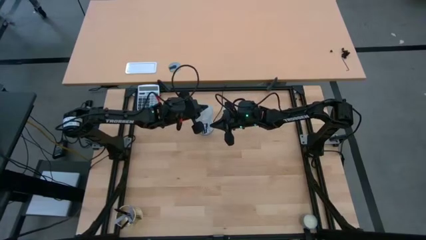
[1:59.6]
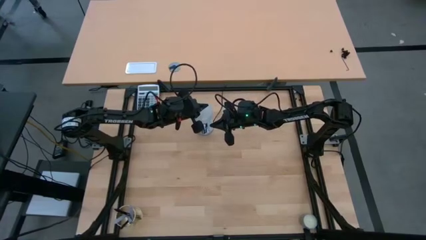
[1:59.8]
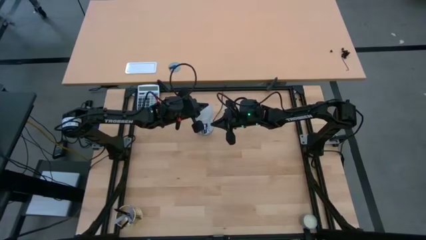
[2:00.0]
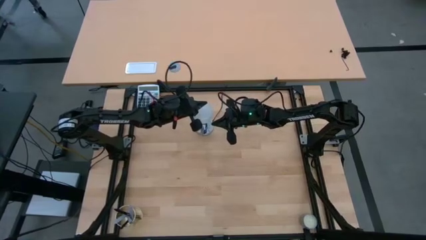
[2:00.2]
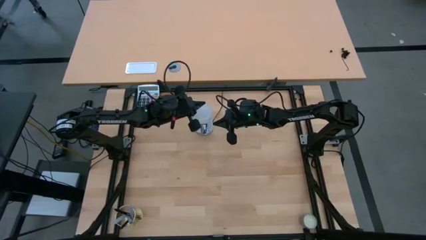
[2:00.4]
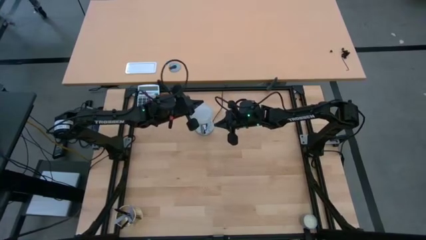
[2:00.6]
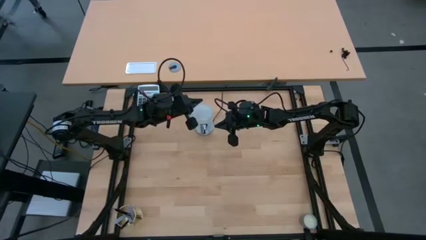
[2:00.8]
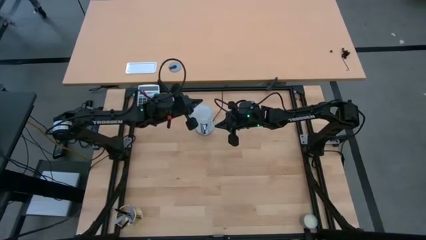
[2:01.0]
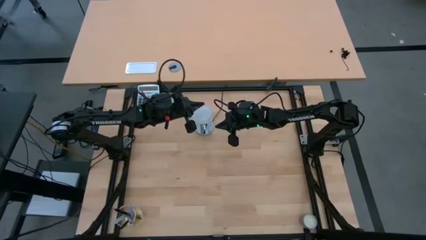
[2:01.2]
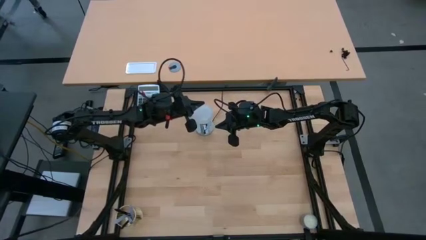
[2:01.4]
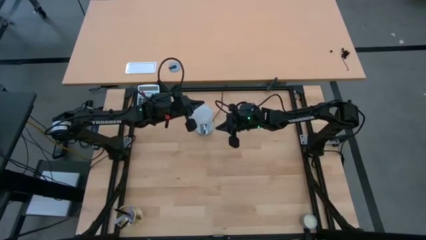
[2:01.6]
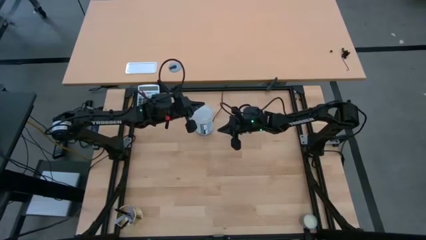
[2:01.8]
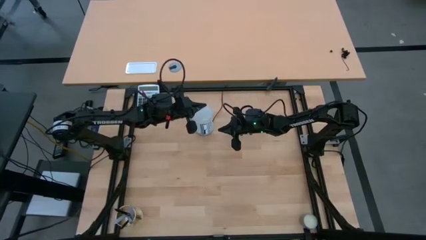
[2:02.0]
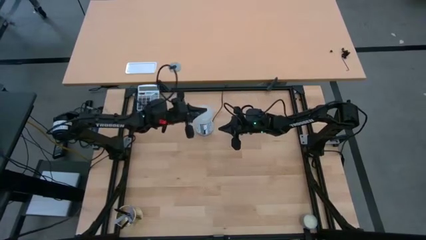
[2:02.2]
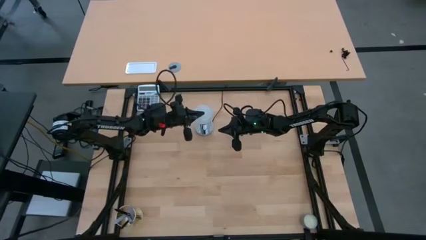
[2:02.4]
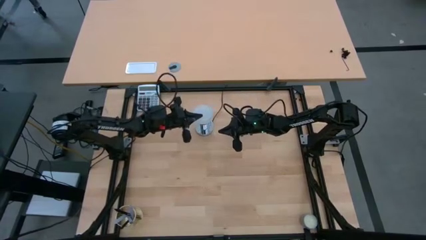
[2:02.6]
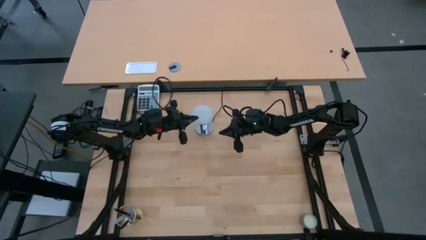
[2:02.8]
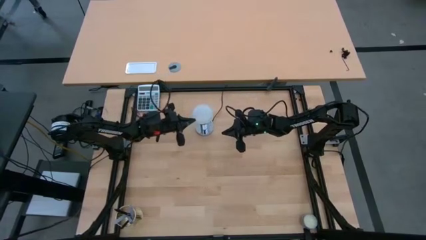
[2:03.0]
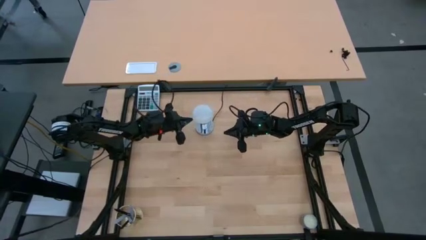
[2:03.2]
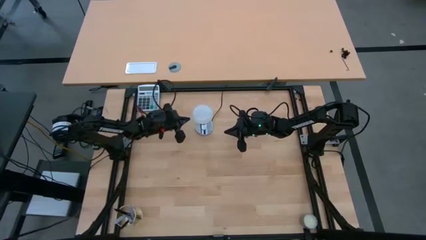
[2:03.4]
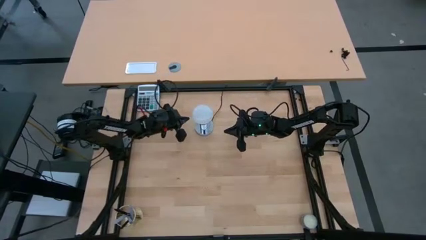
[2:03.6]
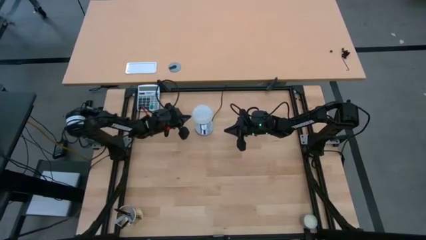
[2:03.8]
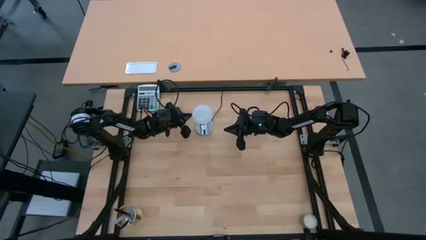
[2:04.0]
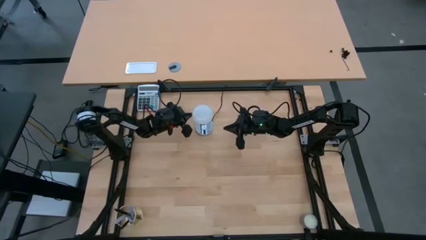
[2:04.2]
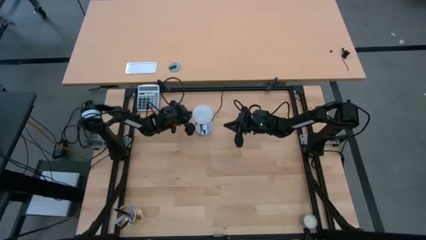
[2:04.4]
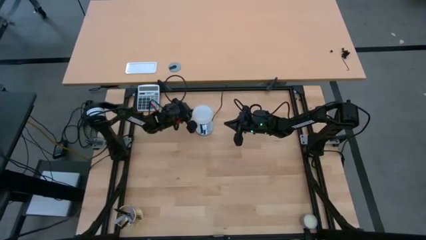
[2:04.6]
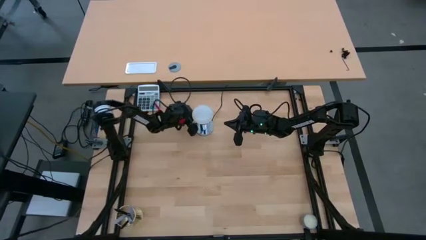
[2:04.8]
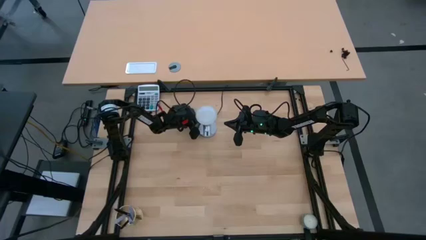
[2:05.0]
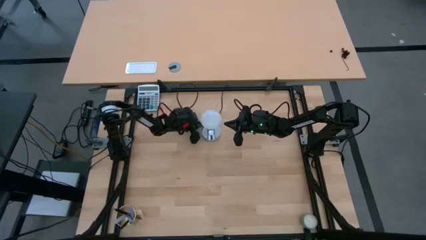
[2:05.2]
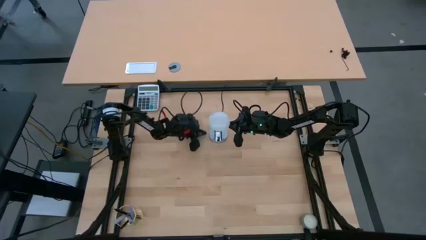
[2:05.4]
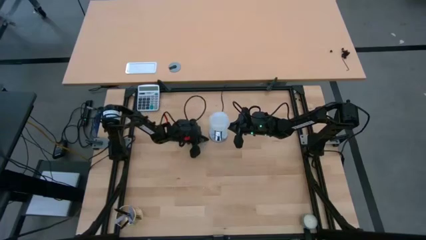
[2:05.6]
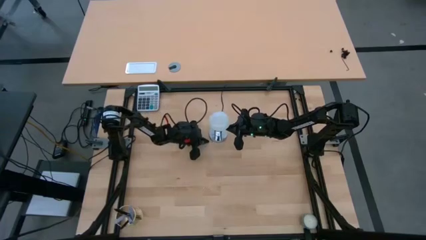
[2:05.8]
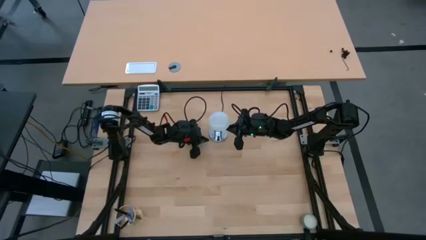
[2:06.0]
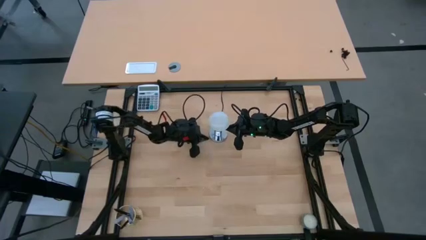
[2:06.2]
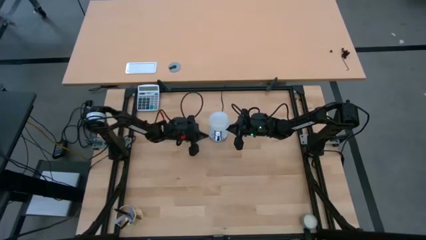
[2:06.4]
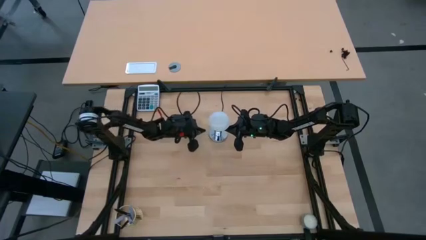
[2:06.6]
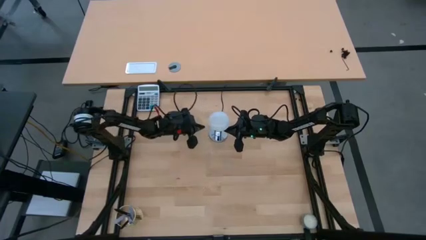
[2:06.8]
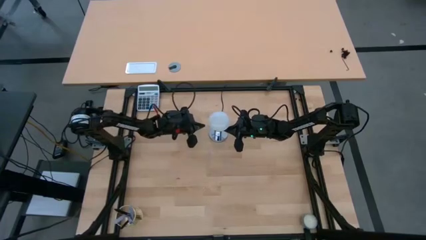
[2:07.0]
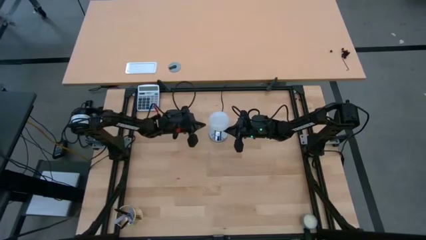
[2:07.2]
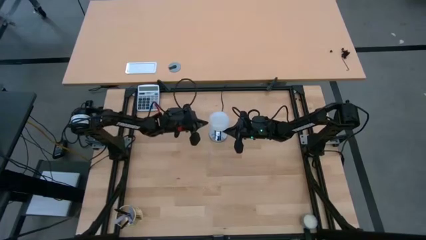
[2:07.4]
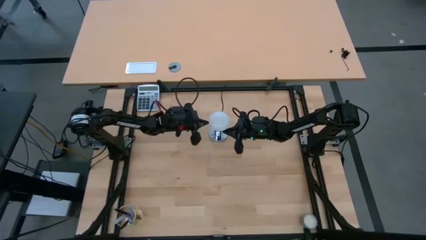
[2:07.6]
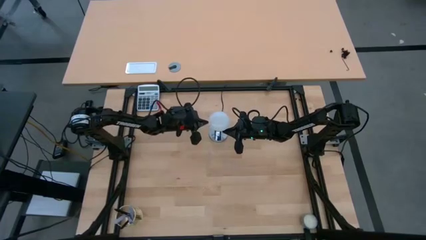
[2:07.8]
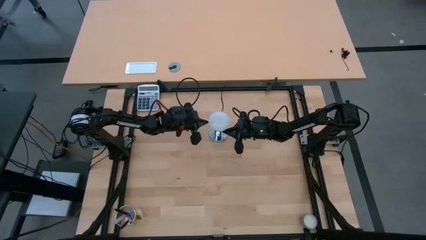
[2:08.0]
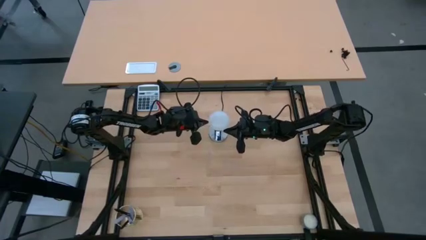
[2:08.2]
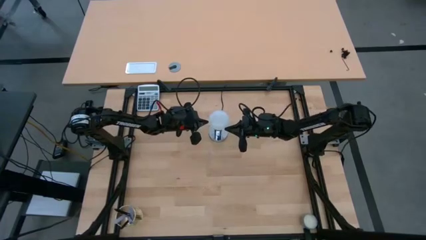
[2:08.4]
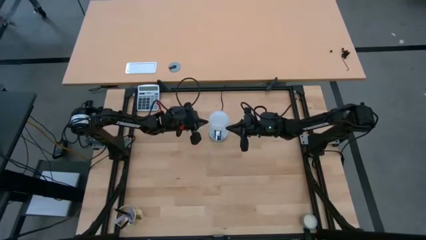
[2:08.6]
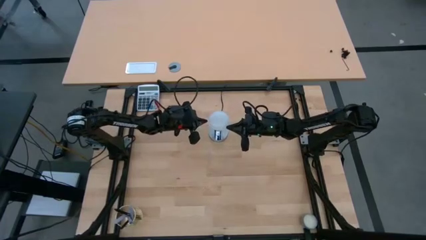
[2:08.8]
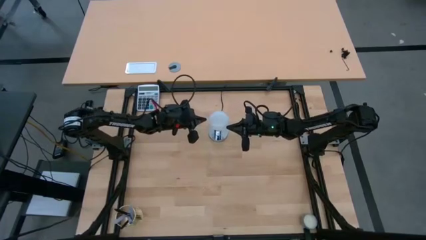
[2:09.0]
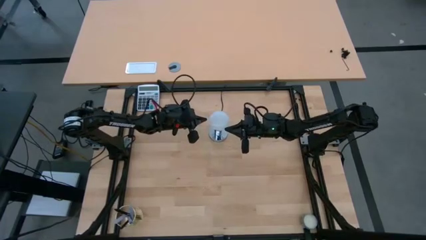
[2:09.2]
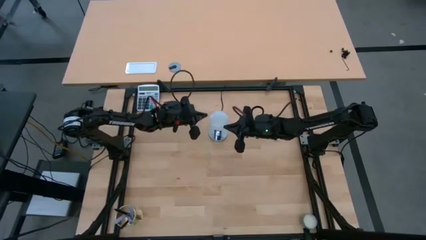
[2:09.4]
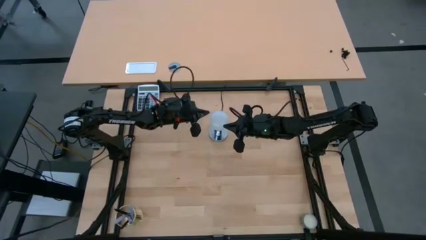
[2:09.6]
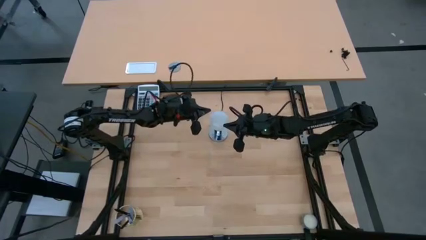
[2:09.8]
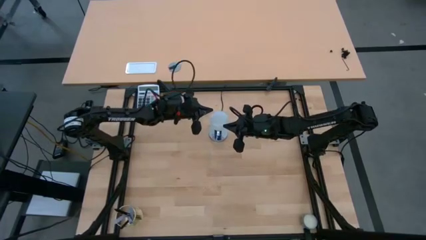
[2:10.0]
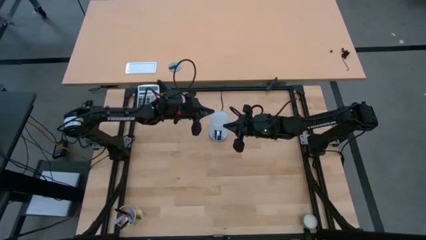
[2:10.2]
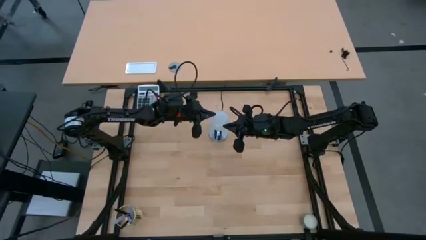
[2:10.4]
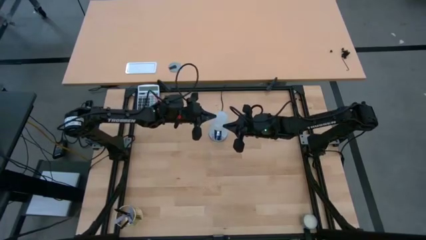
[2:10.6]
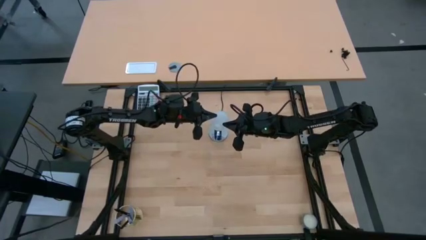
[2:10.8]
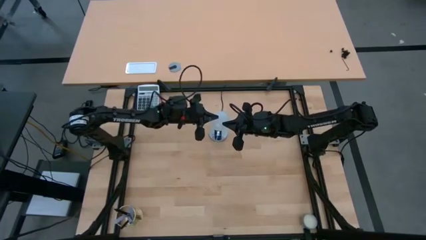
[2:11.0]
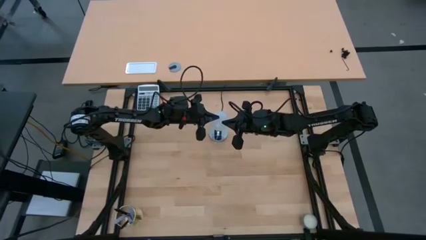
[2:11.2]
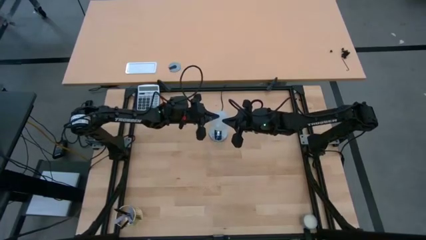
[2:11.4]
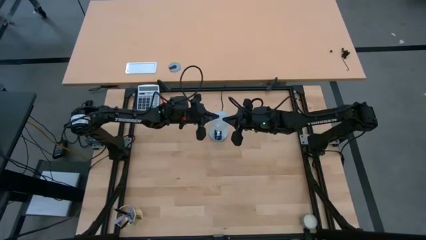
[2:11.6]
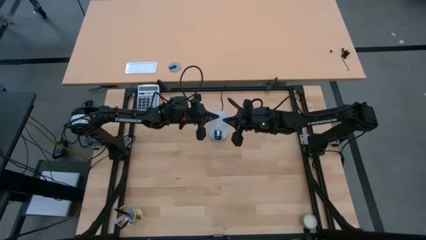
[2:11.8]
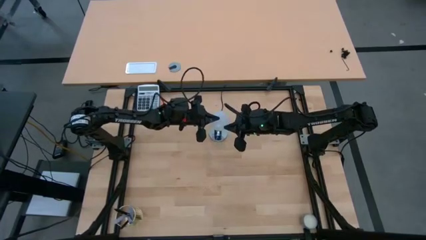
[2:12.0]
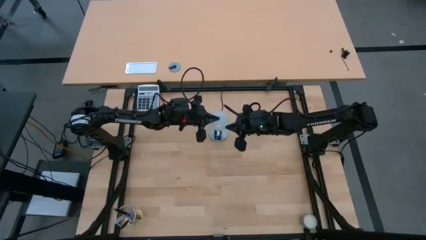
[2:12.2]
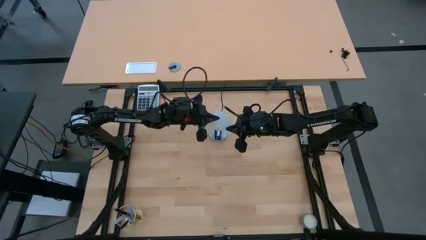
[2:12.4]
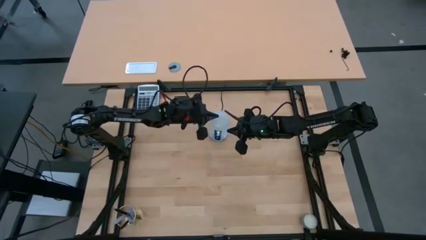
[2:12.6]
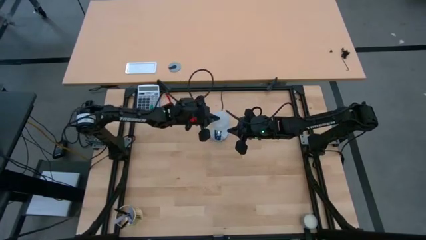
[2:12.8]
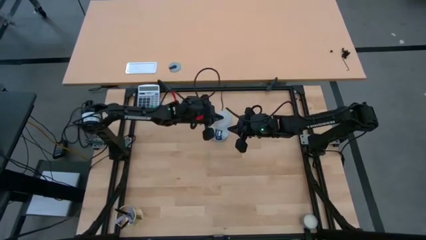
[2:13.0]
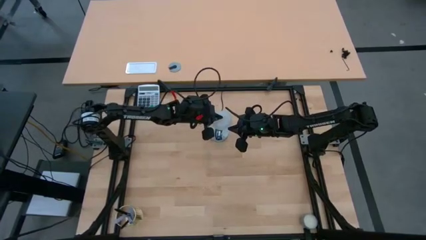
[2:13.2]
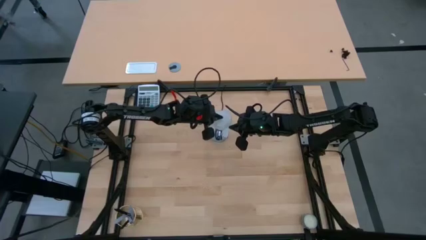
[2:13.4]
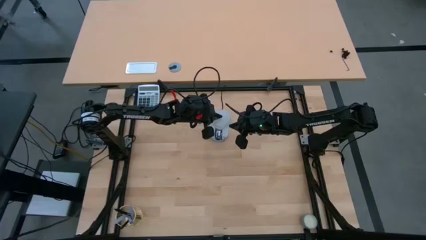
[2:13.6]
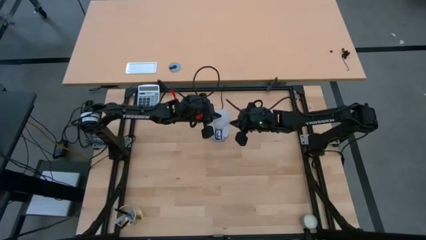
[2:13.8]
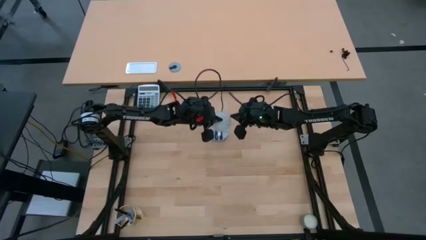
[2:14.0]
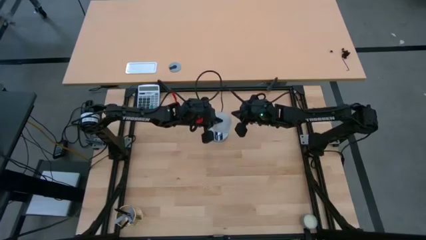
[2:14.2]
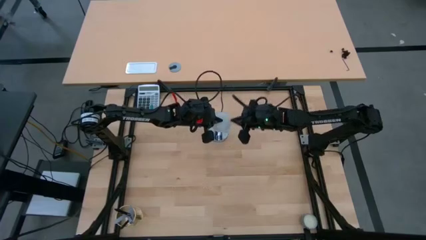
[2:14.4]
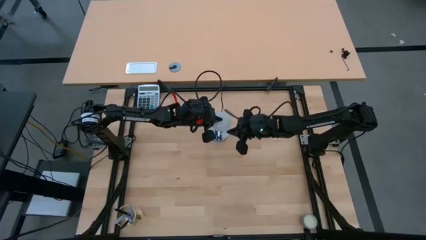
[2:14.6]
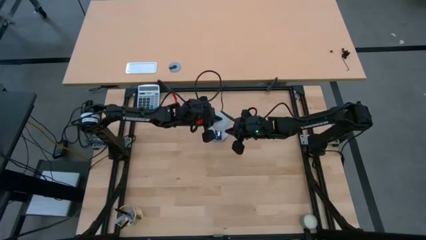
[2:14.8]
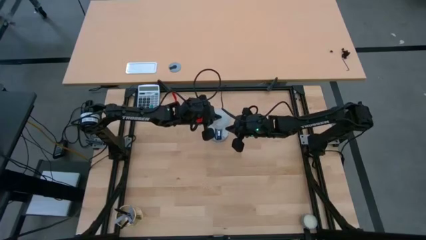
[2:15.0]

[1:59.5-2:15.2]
Task: Screw lightbulb
Remove the lightbulb from the lamp
